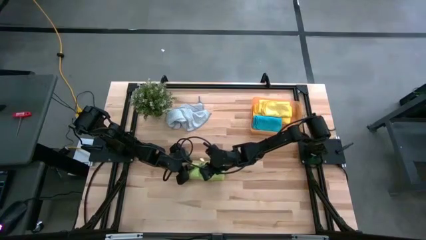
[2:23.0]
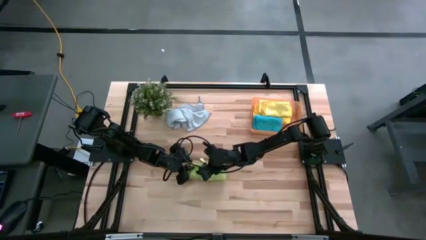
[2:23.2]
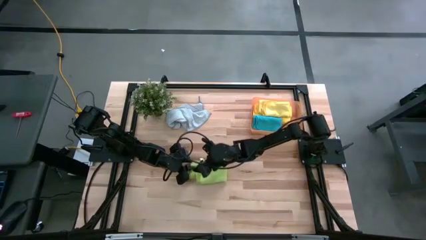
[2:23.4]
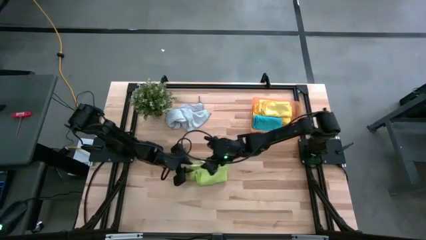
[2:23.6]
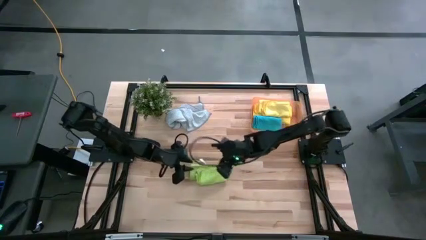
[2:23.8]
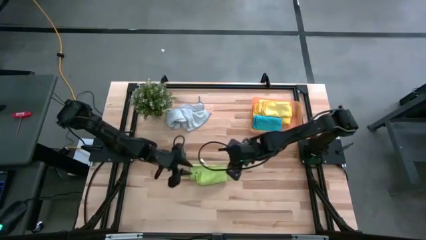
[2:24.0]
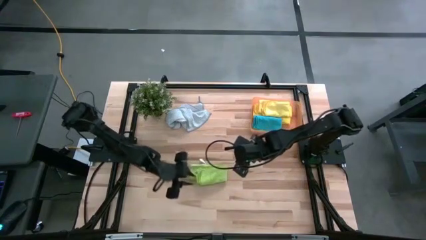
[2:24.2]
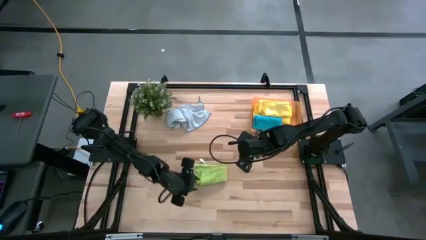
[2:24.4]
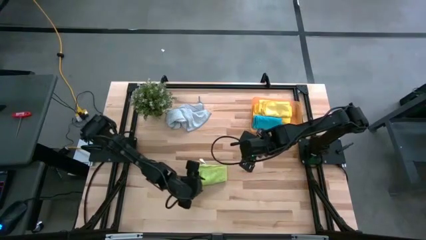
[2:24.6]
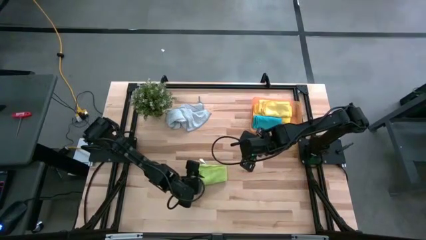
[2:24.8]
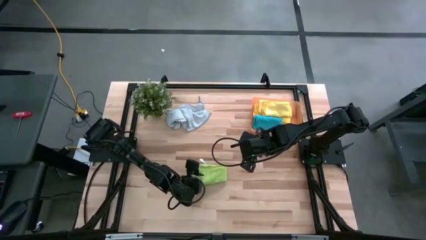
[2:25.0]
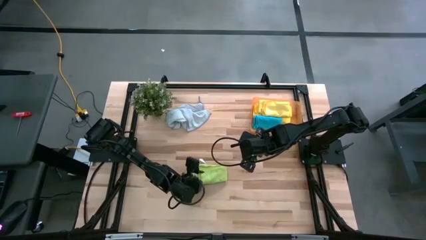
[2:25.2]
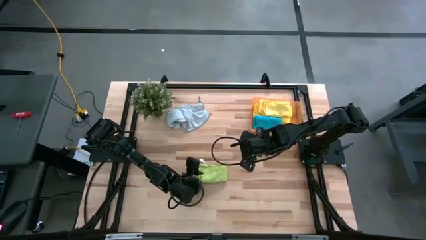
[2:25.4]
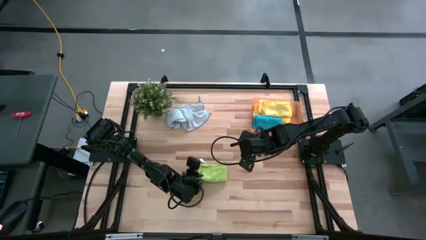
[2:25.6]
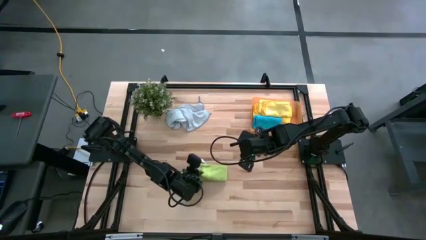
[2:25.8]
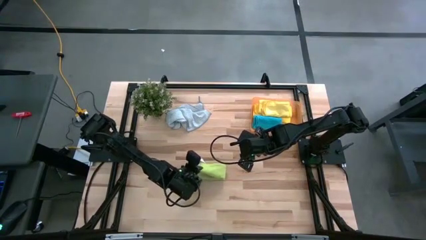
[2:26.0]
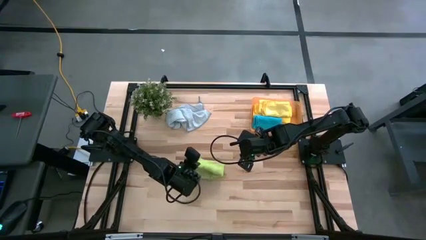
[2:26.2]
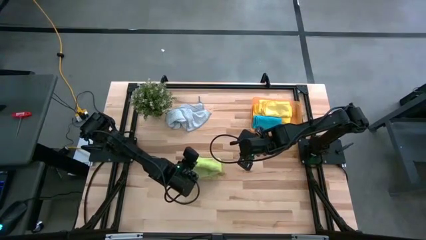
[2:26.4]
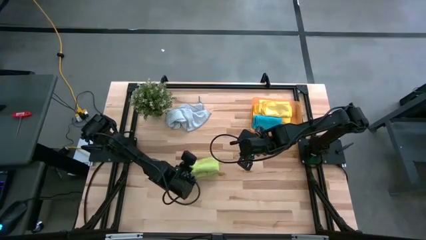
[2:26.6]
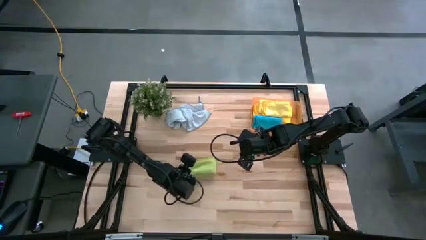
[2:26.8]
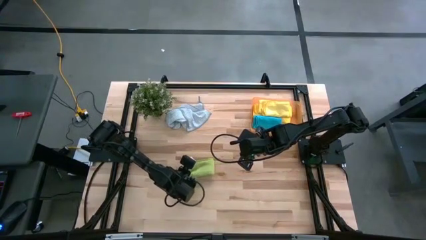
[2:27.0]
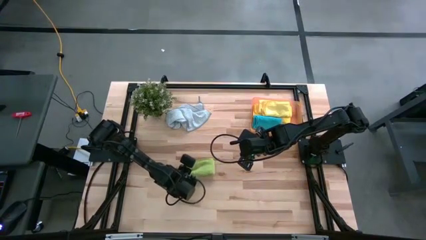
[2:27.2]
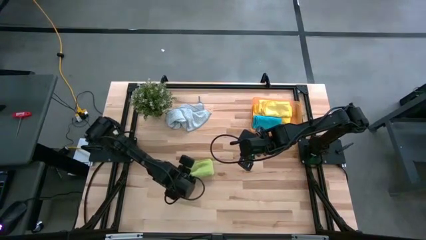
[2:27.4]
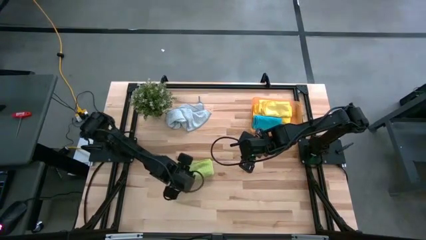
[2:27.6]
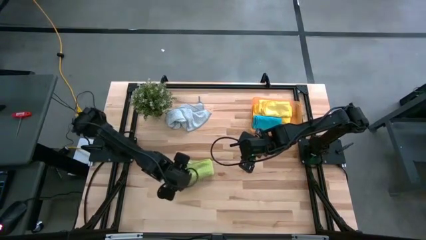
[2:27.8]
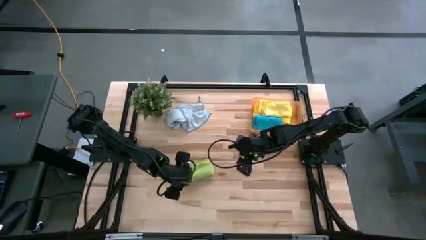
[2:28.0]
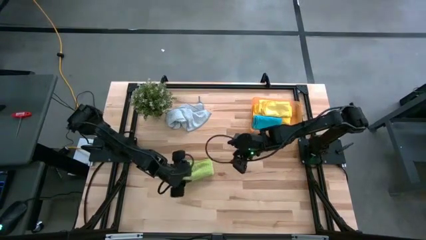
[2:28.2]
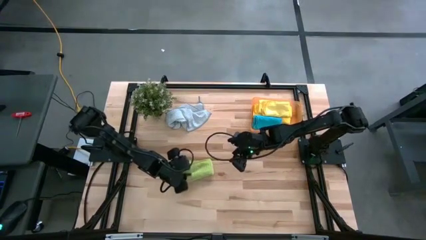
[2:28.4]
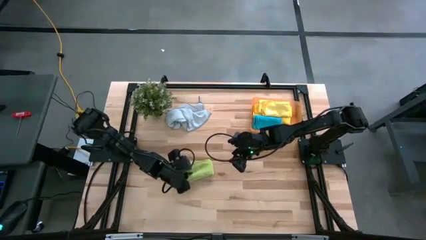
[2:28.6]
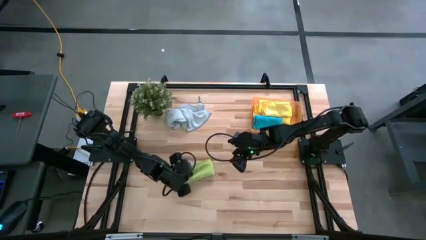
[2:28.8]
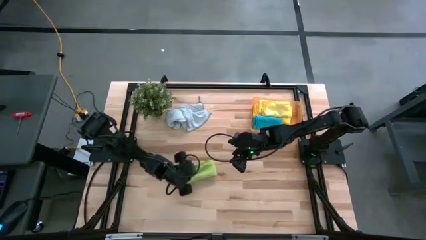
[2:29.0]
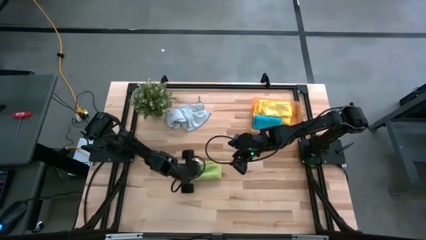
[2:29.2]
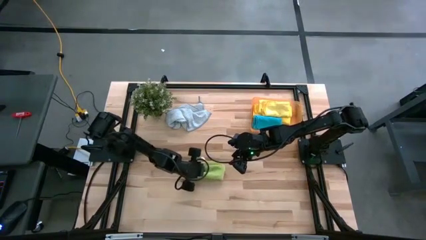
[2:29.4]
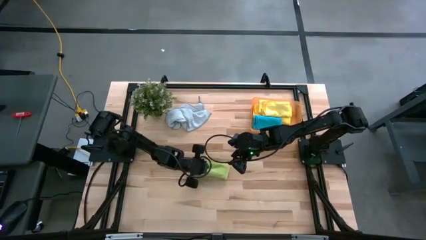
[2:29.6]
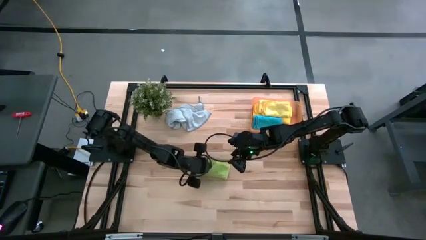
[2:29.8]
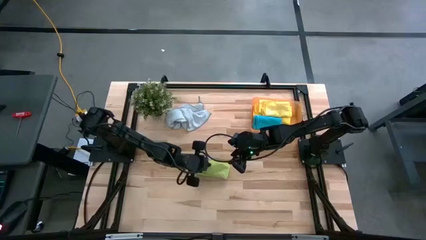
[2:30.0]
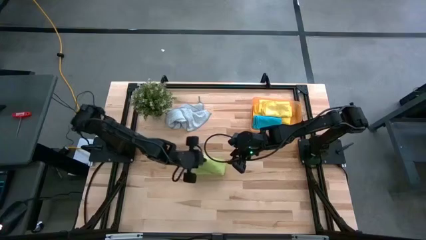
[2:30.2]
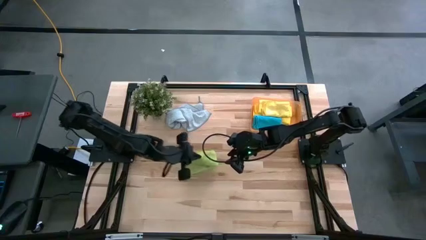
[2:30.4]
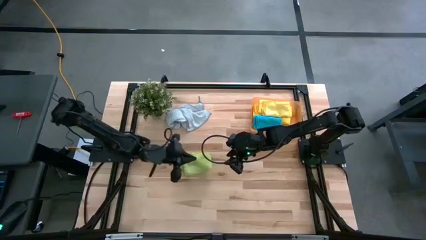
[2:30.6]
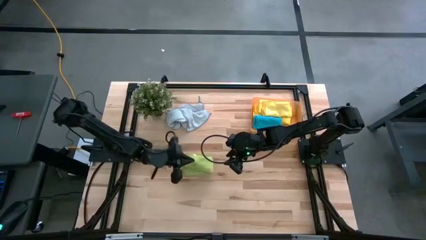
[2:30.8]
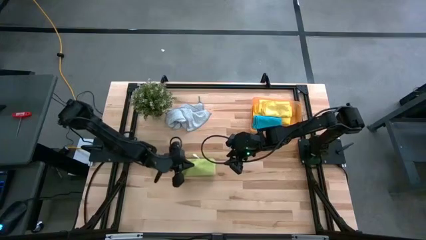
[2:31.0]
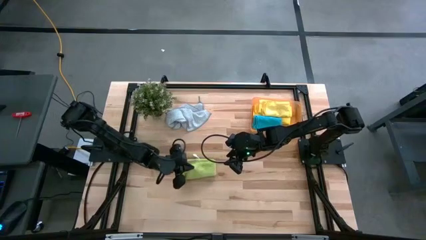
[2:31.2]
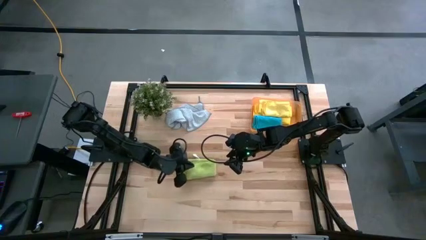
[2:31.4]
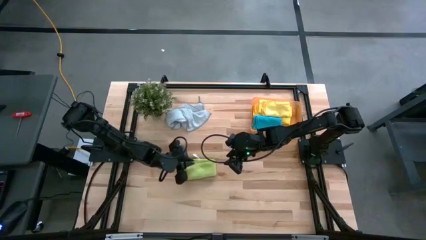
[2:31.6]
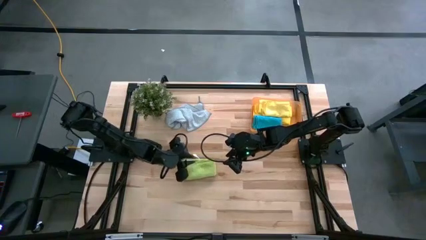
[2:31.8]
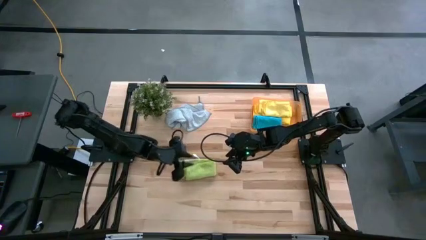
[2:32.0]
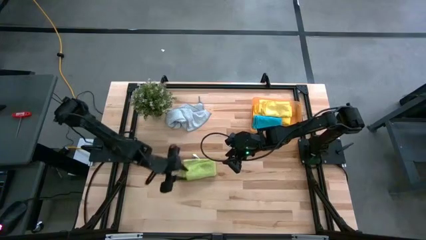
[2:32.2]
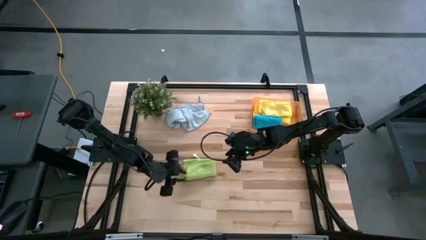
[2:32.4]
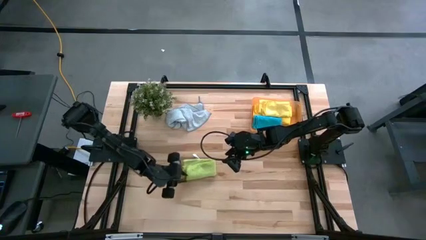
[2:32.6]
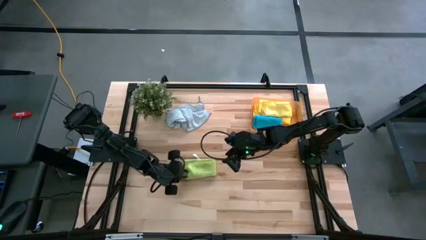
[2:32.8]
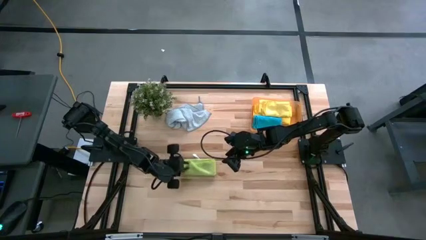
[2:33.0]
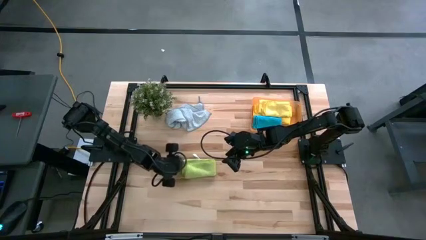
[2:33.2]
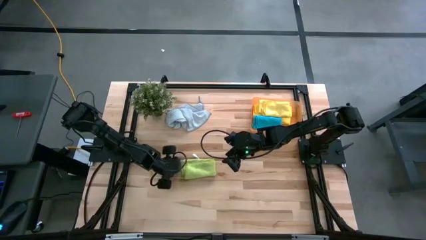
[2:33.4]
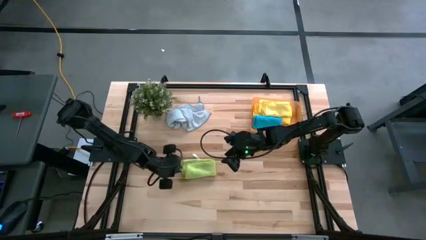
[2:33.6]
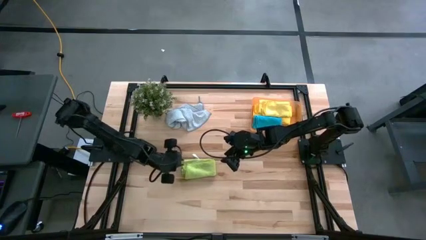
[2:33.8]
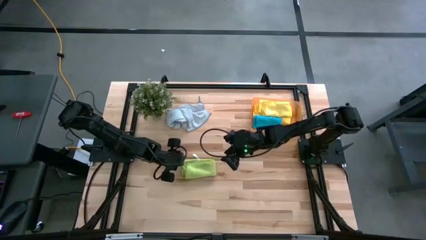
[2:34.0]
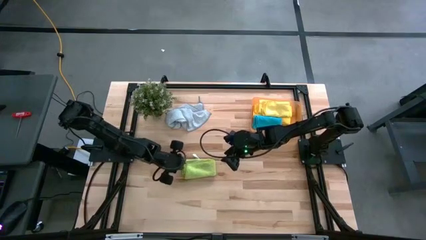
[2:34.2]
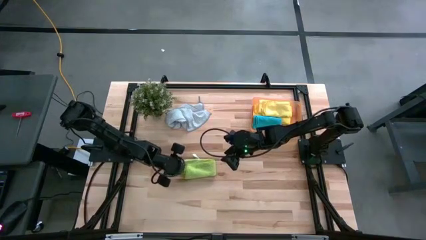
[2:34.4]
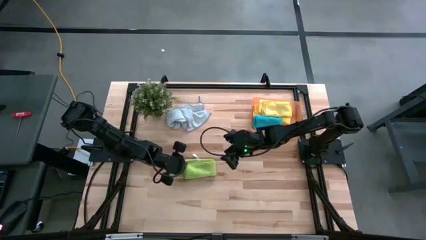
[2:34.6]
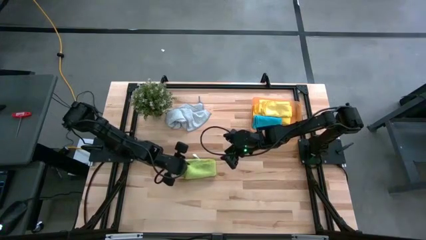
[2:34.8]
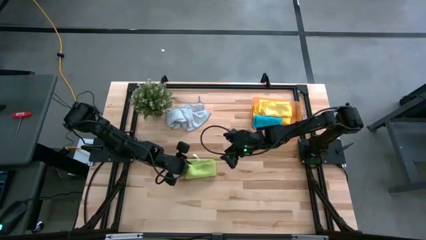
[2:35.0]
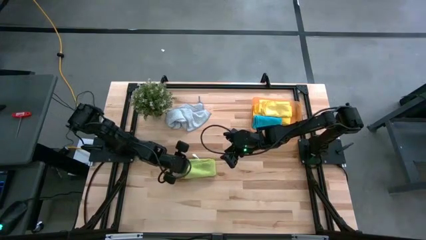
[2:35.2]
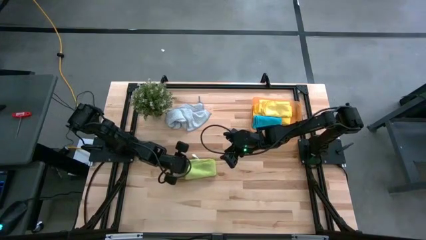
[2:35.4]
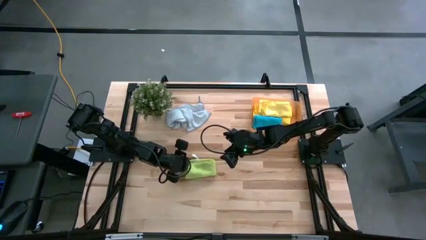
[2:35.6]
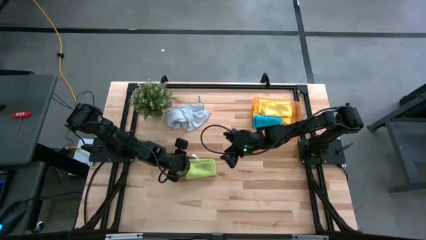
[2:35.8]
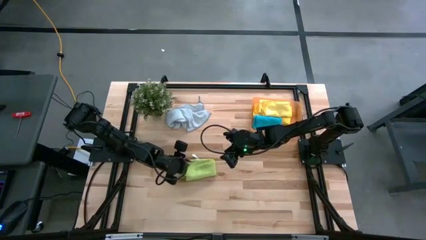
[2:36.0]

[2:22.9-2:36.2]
Task: Fold microfiber towels
Fold the green microfiber cloth

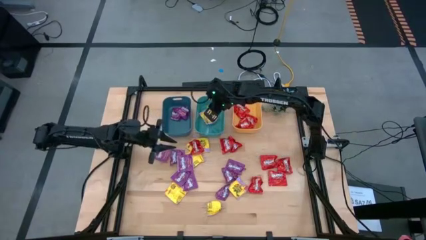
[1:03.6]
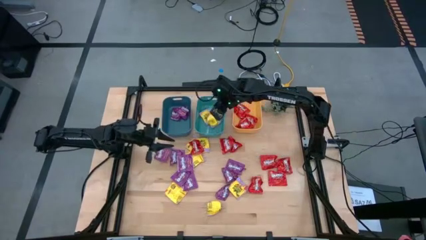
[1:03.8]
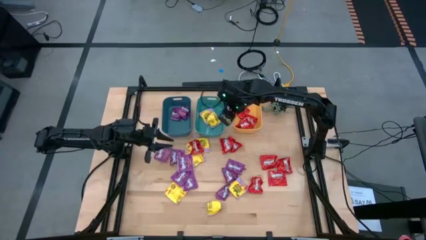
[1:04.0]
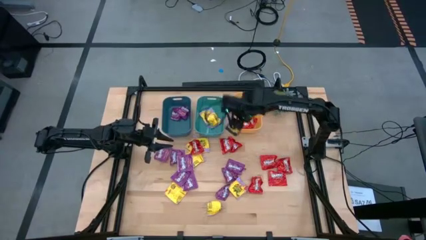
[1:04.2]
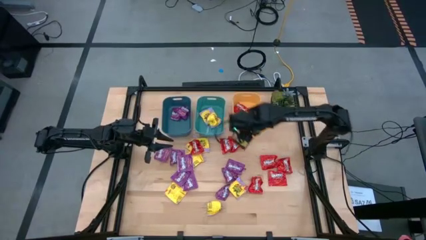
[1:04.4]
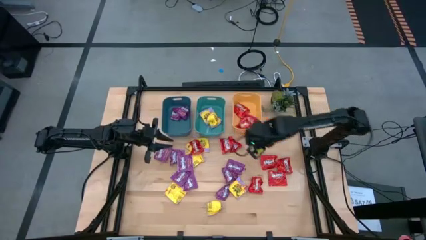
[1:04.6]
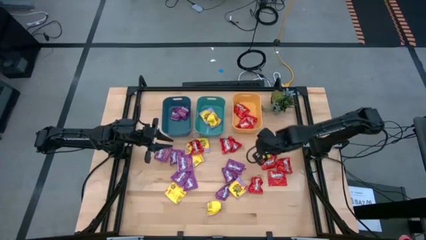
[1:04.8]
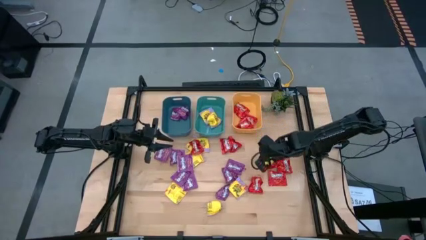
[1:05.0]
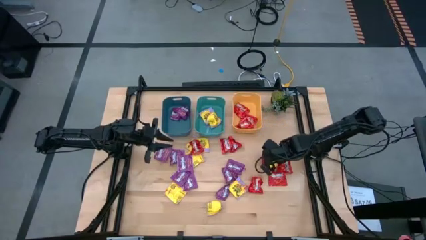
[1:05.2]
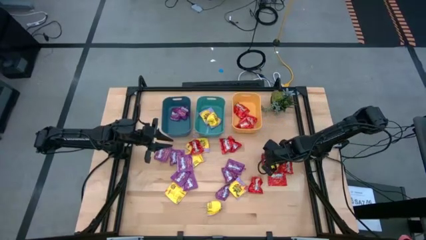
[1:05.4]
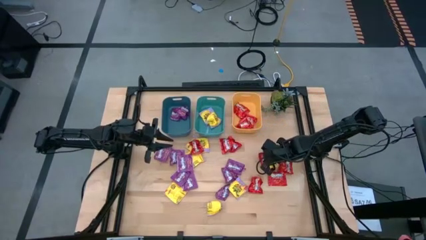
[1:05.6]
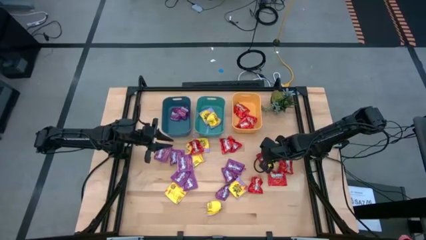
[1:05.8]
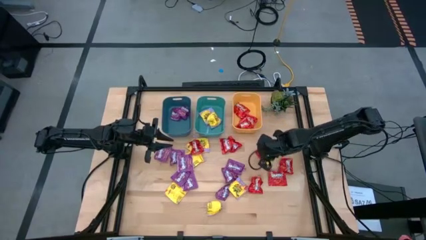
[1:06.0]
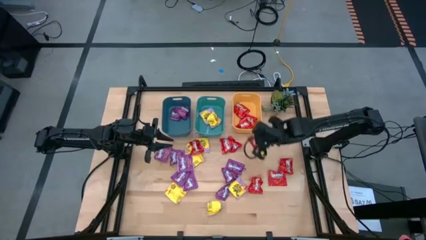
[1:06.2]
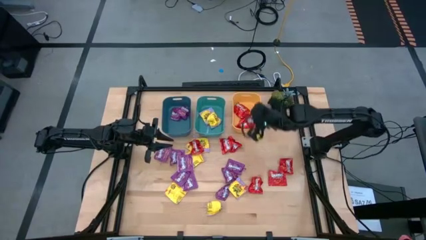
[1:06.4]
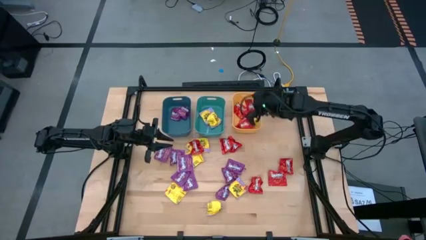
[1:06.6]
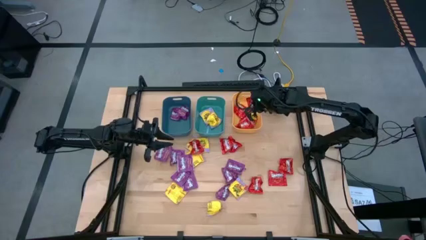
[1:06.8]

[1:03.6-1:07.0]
Task: Sort candy
Put the red candy into the yellow bin

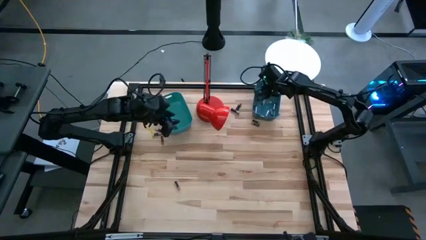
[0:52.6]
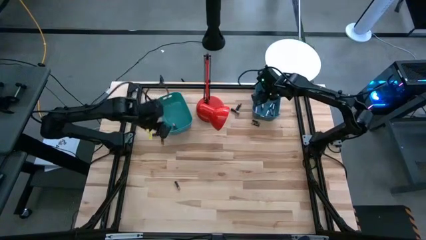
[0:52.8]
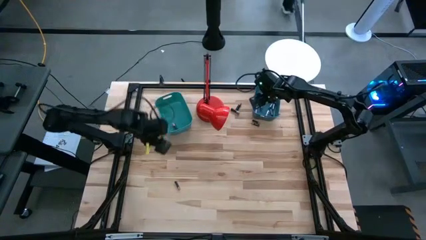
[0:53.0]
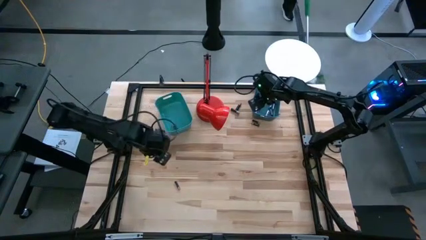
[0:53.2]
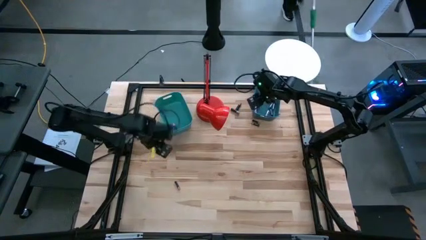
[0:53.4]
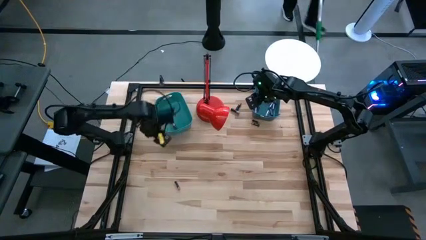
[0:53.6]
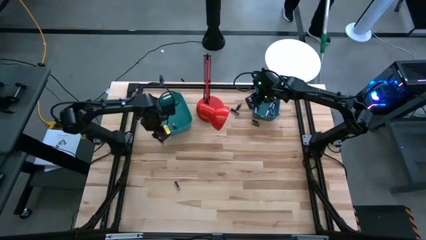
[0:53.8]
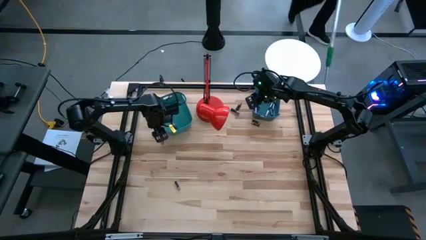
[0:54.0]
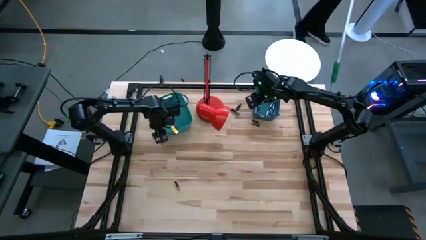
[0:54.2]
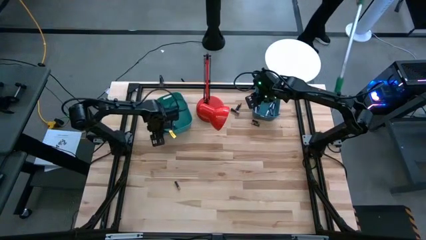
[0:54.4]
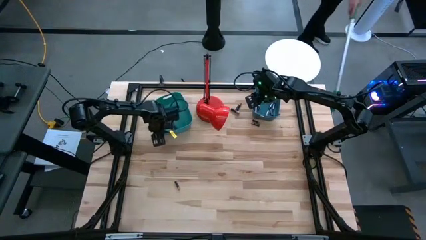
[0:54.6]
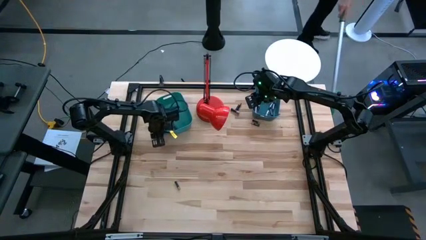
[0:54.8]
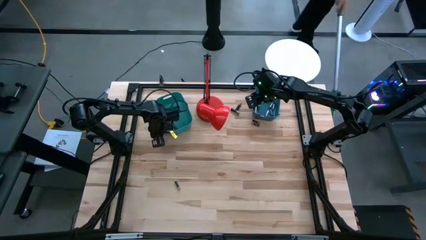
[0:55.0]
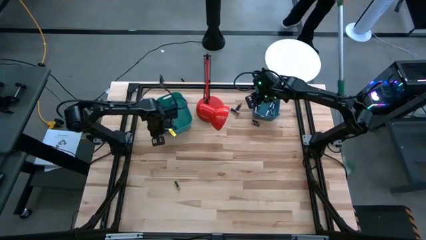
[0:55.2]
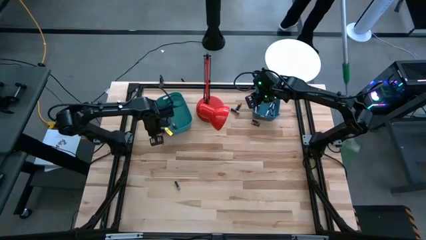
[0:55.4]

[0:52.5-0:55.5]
Task: Sort batteries
Put the brown battery into the green bin
